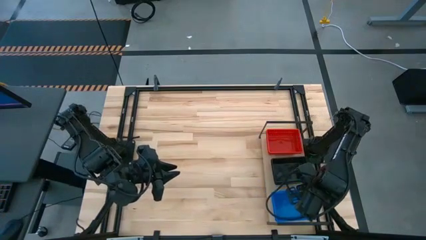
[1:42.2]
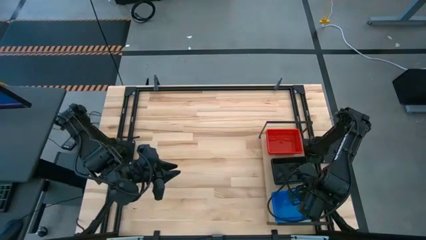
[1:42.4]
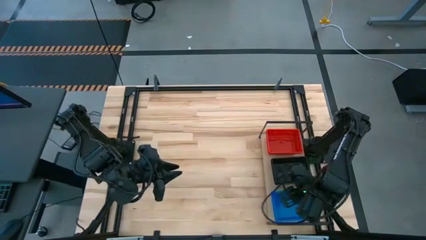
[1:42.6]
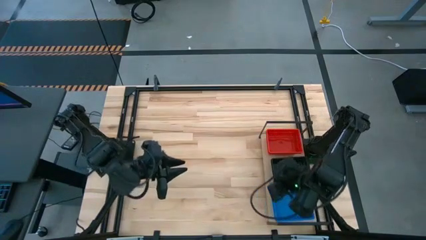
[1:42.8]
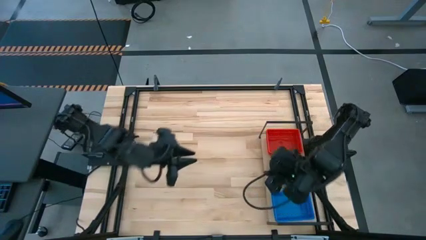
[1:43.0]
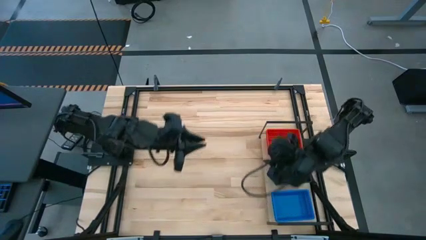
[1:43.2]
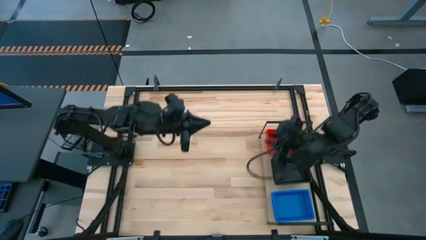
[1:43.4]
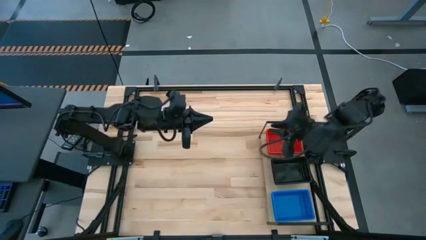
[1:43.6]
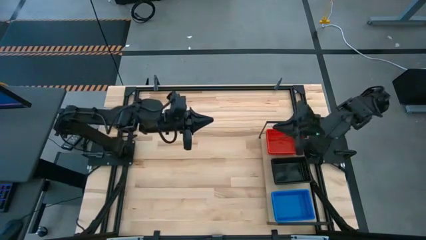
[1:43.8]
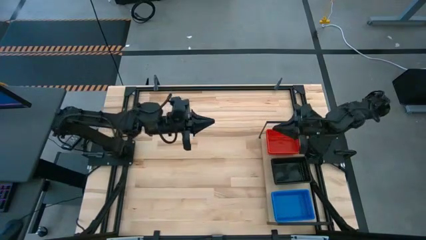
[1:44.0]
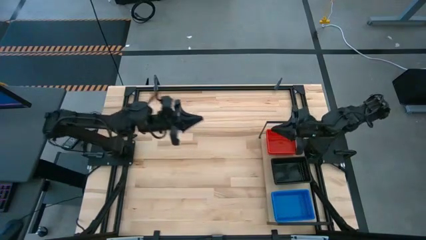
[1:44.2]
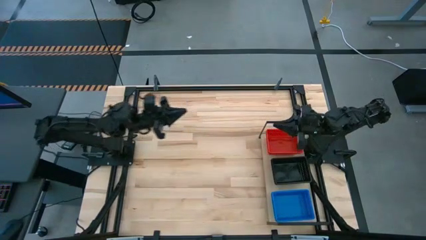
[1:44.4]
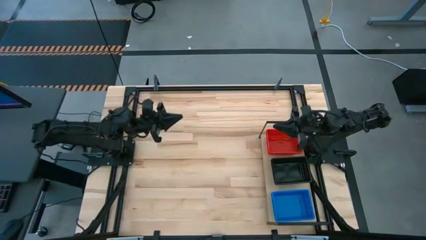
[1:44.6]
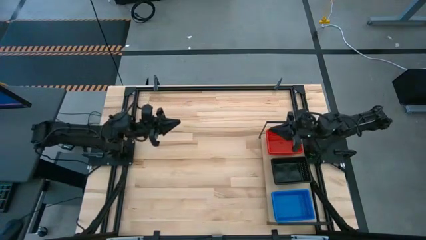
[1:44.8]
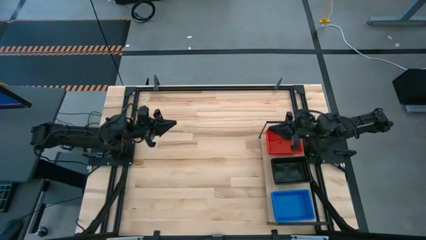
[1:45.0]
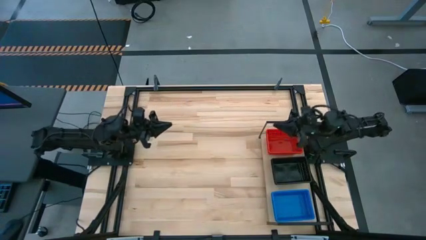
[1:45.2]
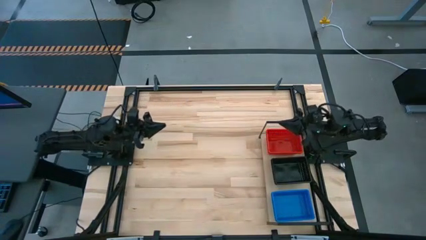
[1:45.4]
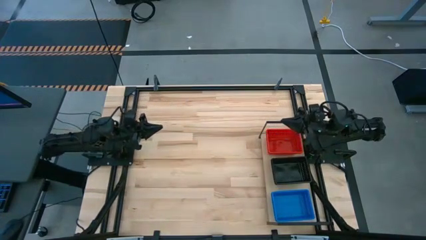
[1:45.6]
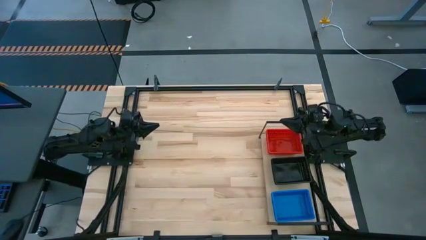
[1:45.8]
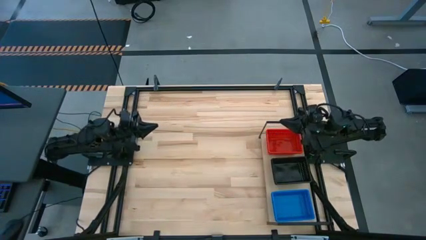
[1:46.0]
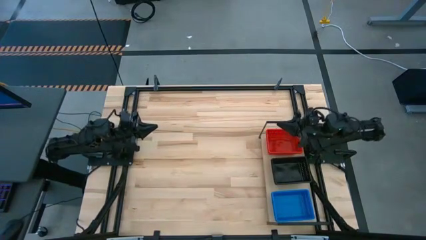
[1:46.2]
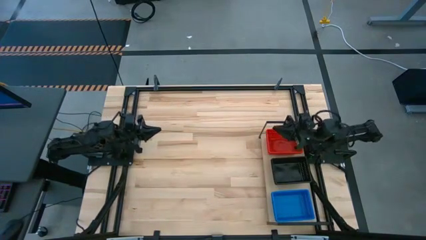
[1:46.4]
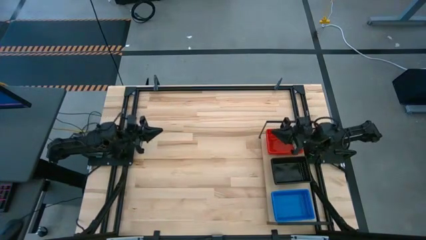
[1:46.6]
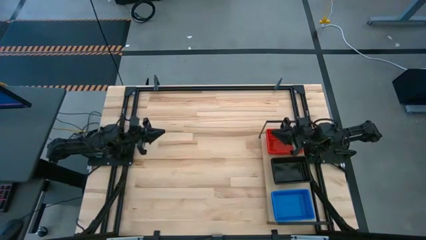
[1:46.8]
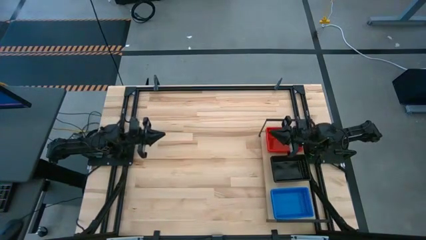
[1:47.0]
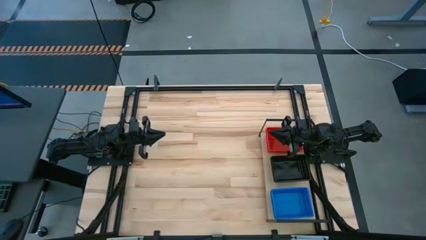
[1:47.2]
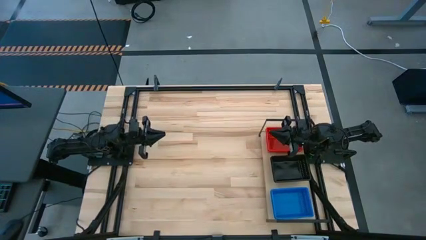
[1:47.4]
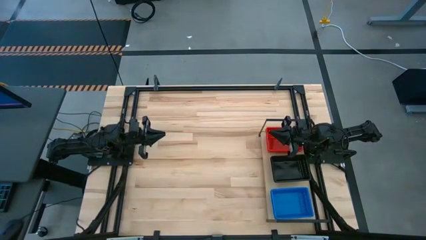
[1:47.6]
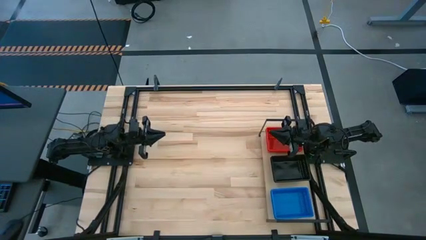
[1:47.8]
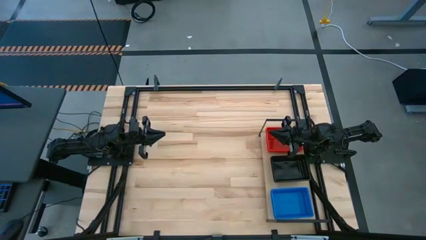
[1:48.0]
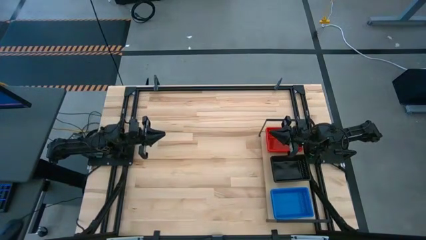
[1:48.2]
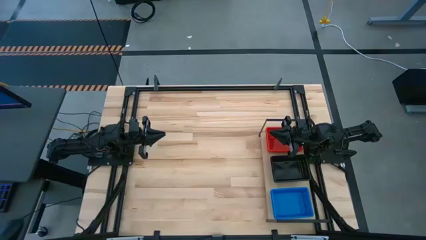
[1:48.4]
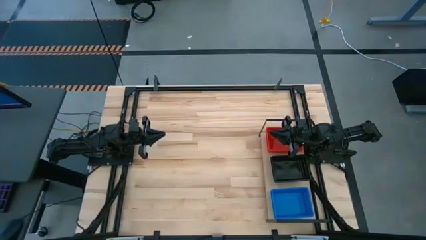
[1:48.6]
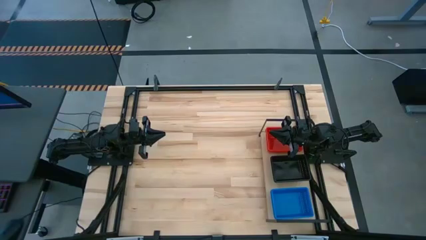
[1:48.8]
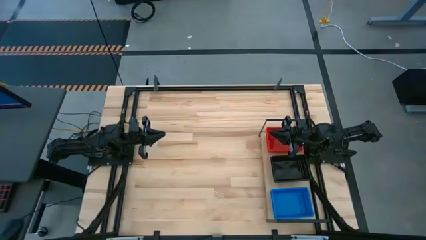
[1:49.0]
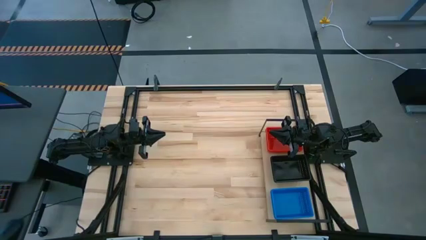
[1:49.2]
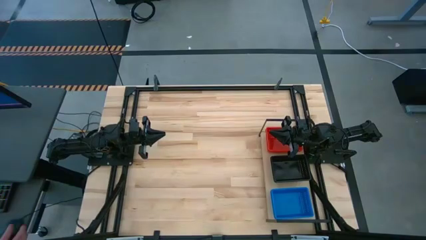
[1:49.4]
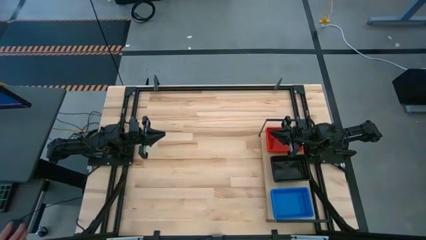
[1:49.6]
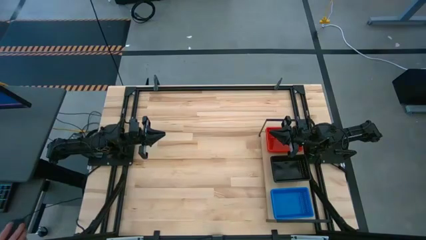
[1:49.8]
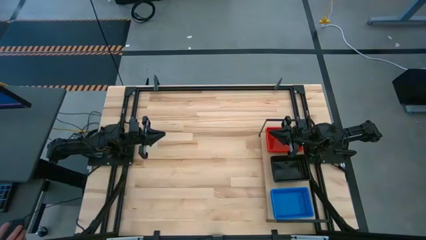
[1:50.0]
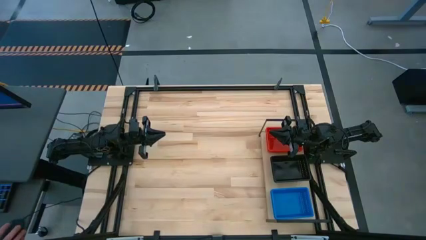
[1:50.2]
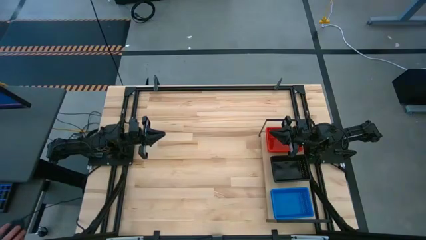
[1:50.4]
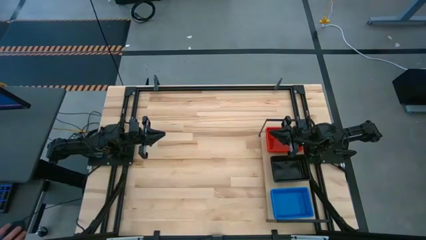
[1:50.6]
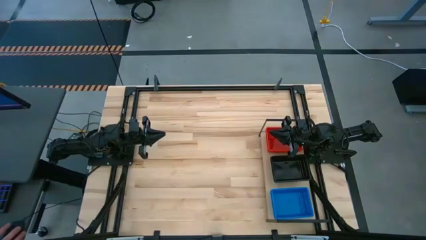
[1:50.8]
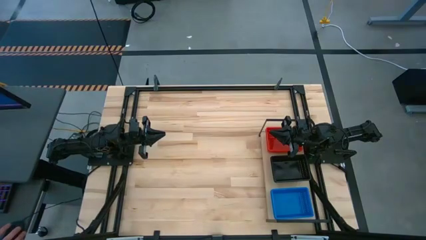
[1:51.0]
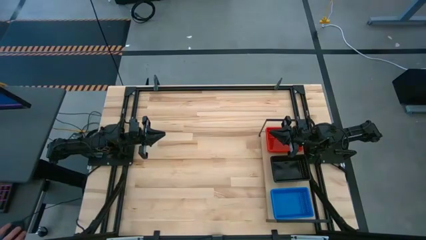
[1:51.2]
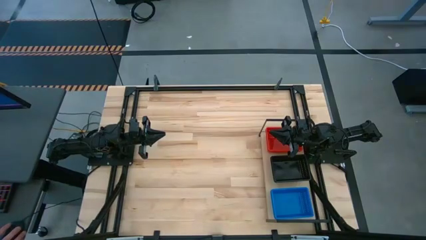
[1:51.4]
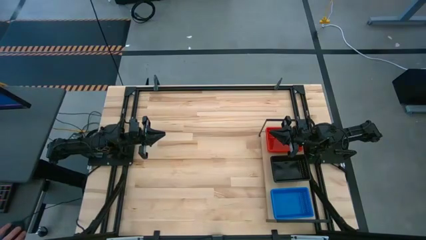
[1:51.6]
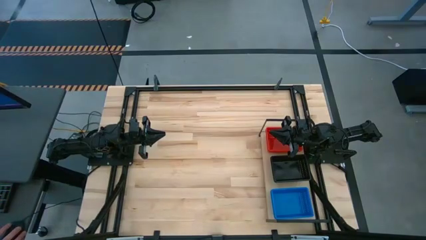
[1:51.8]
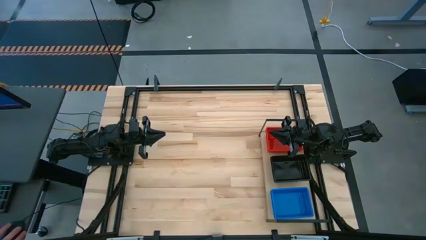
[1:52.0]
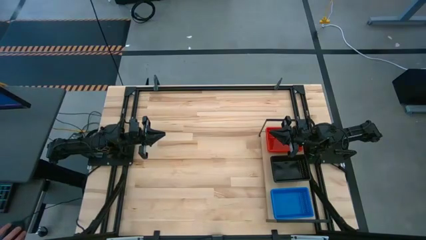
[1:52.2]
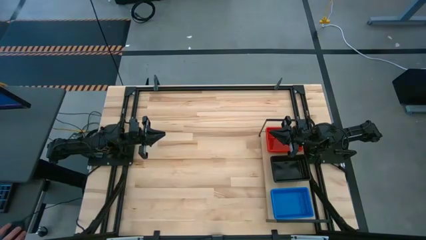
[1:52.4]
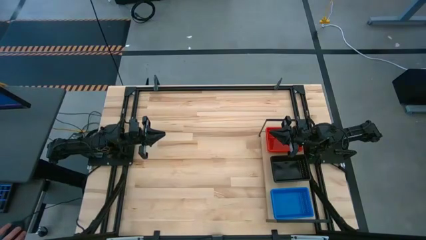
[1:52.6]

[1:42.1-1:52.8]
Task: Stack baskets on shelf by color
Return to Home Position

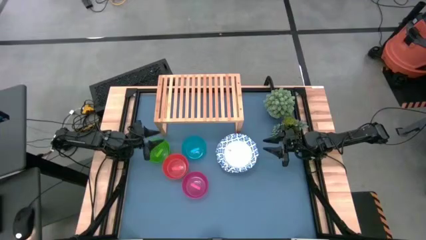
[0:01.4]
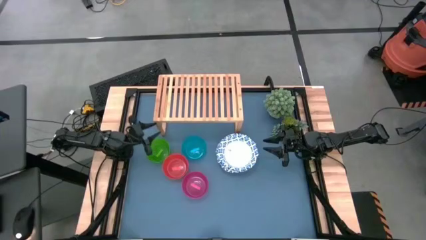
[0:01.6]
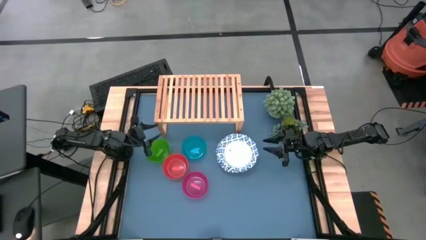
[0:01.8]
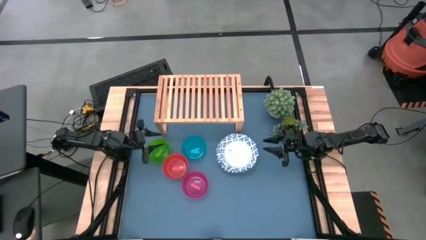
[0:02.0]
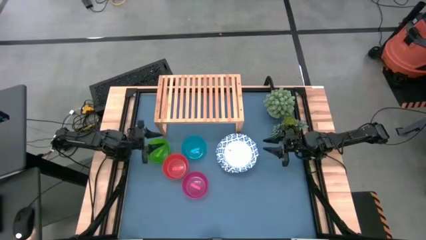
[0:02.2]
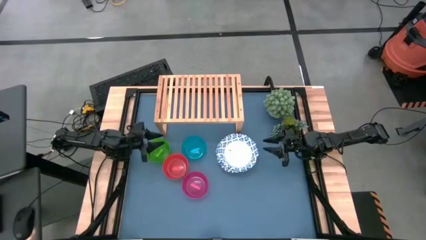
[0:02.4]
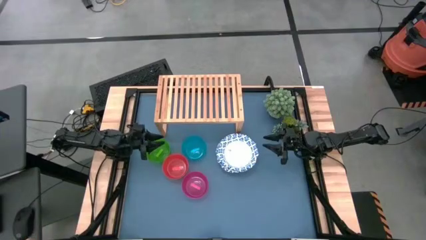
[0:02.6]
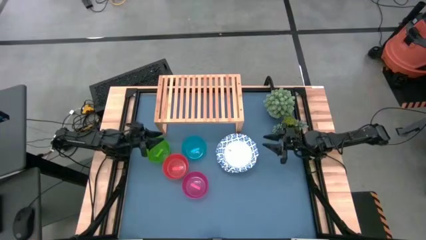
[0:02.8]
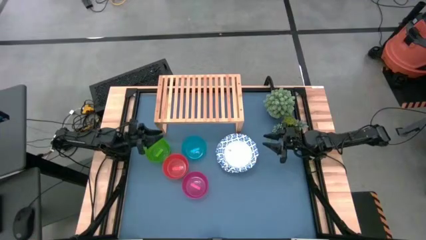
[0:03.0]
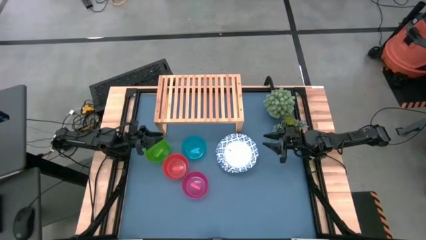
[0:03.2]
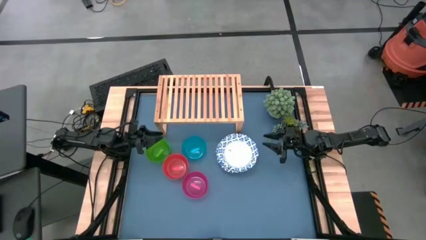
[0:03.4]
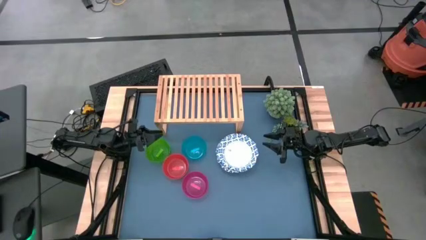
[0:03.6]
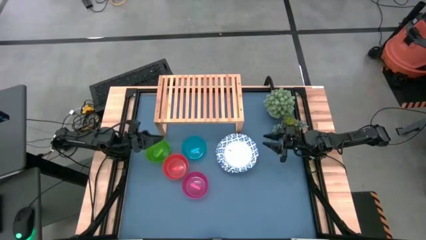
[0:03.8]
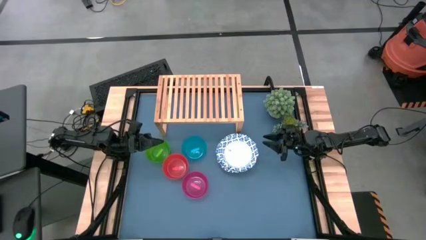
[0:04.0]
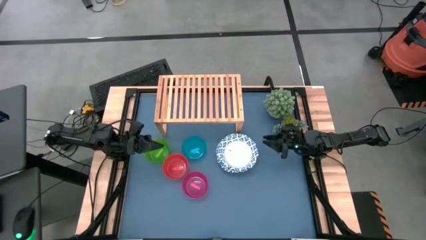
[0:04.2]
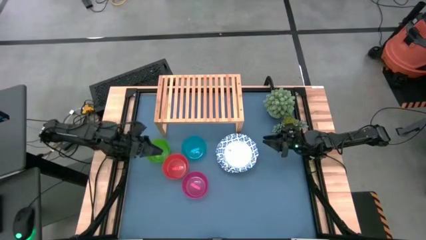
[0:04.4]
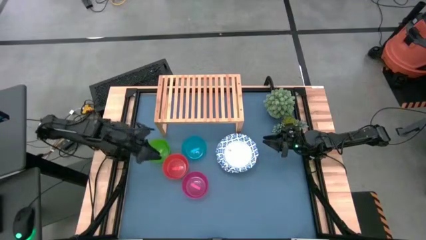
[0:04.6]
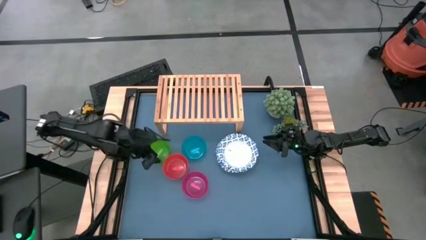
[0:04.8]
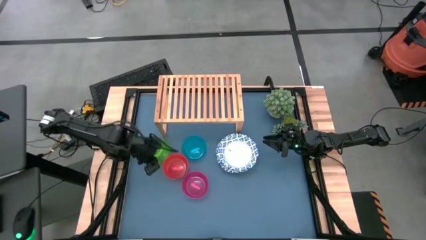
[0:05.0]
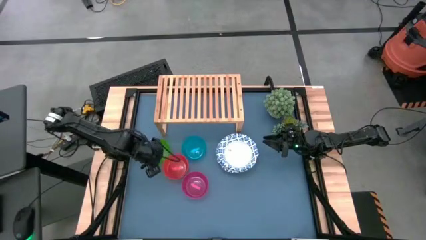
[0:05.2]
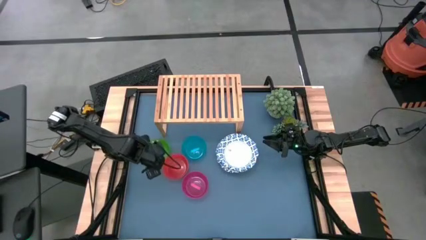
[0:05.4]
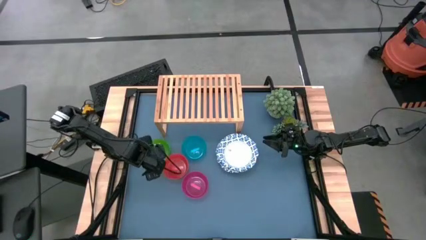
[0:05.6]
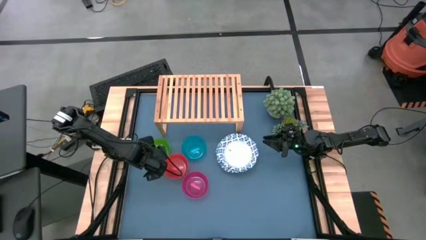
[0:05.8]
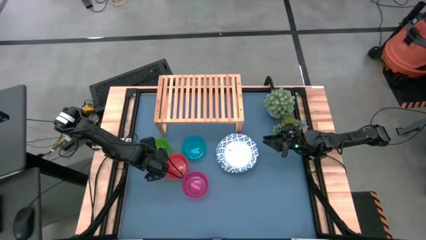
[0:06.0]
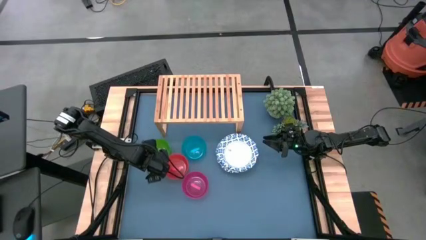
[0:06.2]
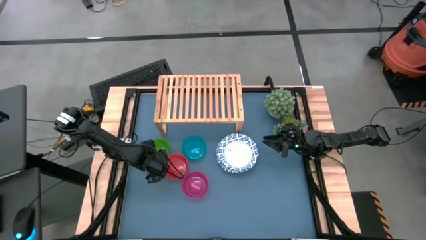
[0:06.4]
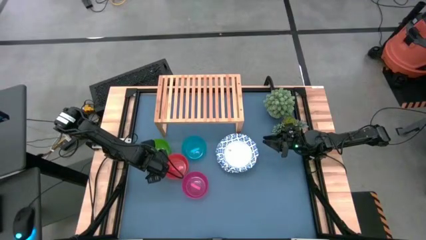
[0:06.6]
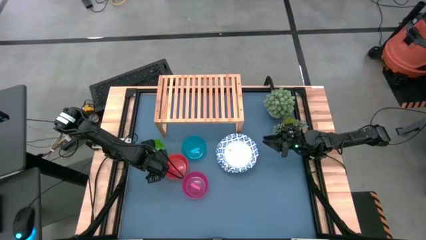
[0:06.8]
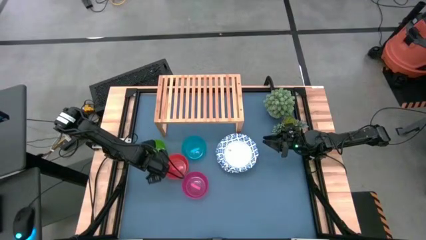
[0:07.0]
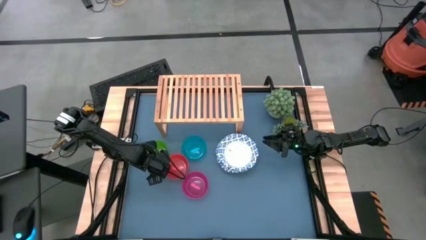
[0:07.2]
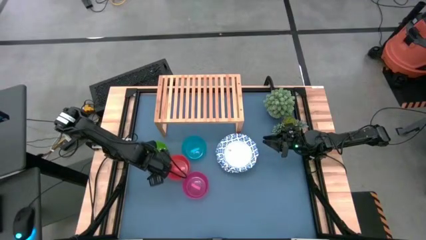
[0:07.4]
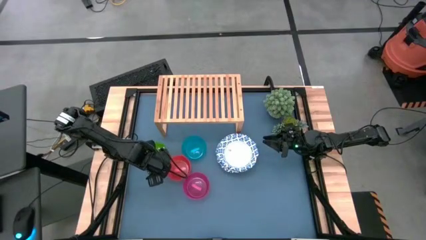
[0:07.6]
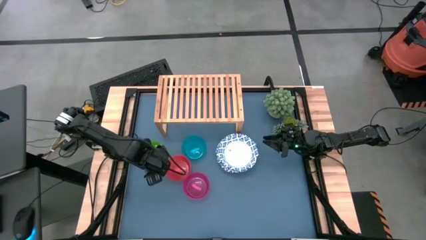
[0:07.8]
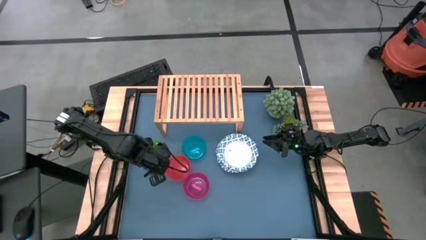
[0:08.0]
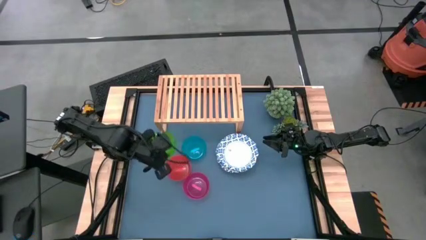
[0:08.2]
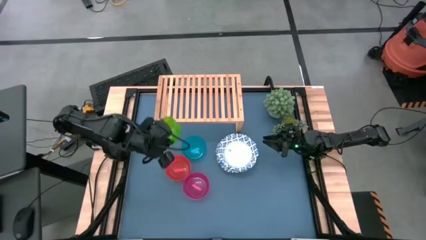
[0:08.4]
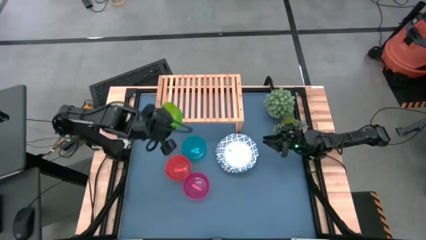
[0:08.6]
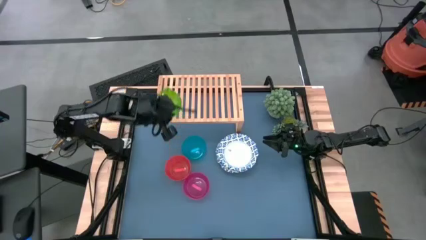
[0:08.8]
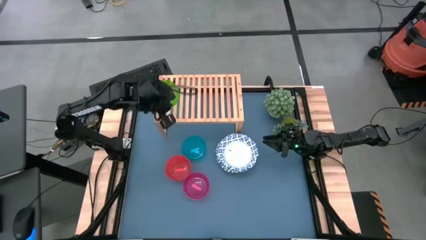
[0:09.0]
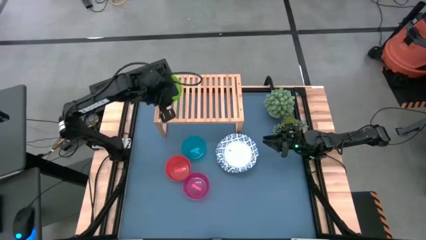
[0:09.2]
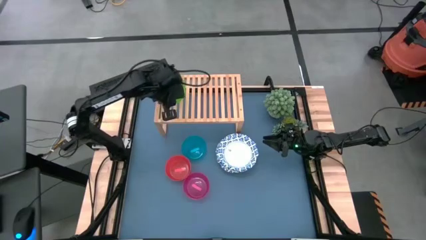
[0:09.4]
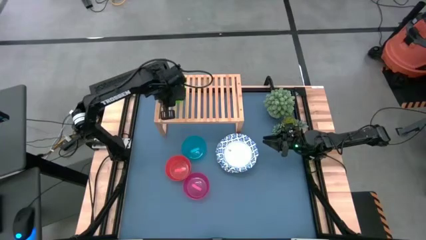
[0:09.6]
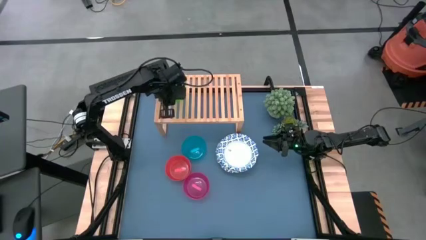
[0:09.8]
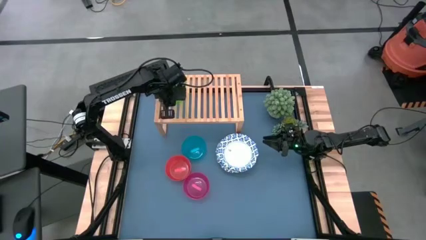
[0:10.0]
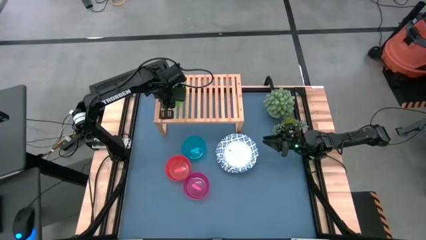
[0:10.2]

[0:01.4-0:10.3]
Task: Place and stack bowls onto a shelf
Put the green bowl on the shelf
